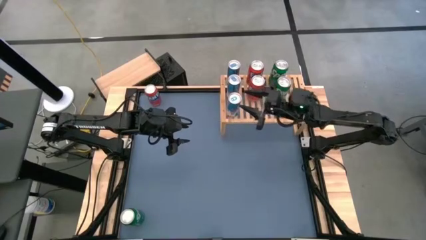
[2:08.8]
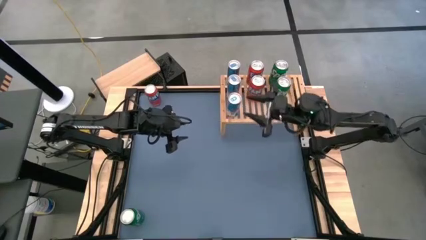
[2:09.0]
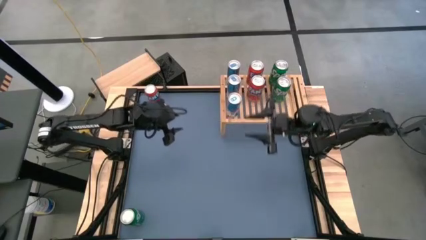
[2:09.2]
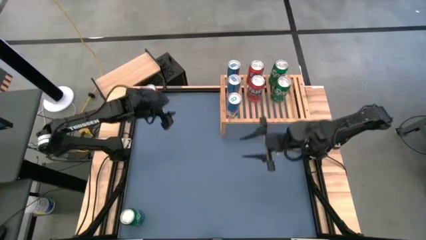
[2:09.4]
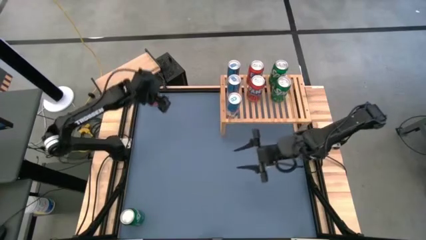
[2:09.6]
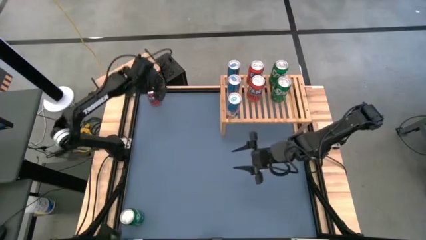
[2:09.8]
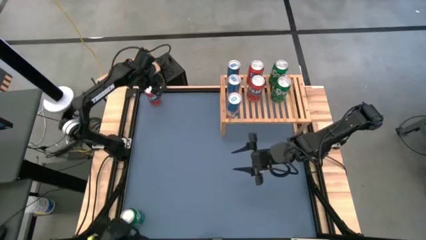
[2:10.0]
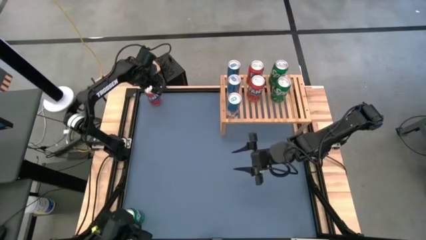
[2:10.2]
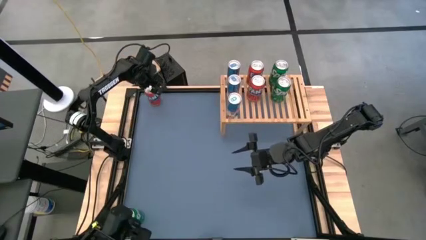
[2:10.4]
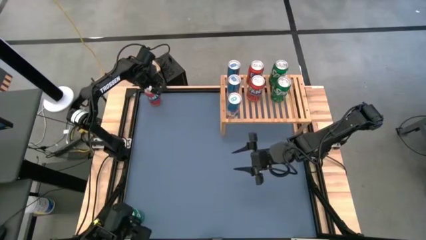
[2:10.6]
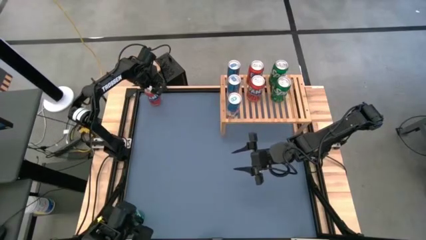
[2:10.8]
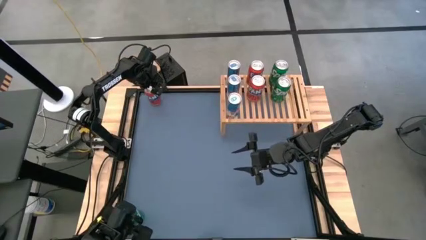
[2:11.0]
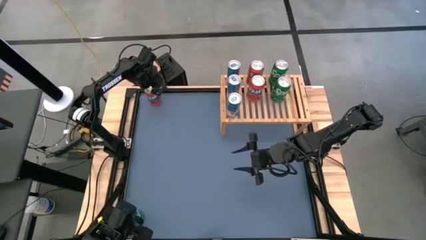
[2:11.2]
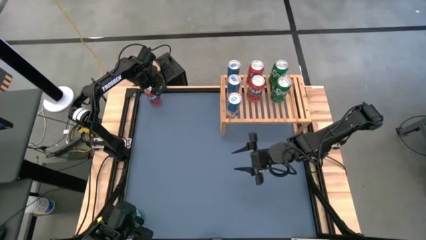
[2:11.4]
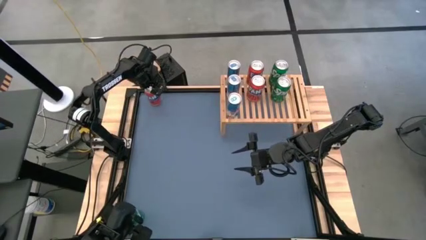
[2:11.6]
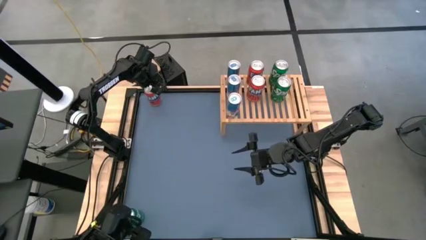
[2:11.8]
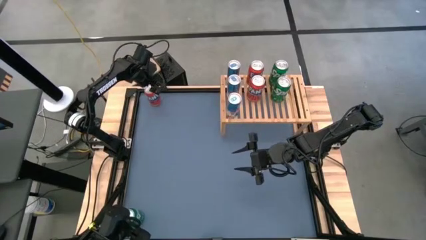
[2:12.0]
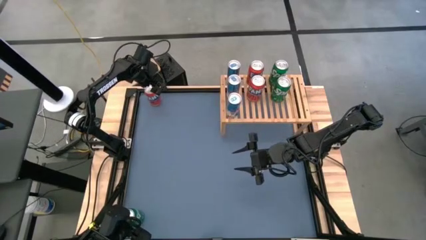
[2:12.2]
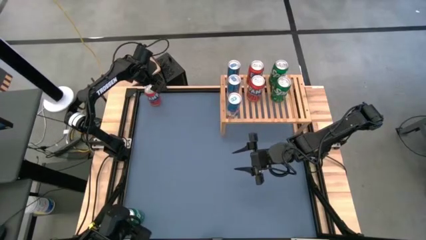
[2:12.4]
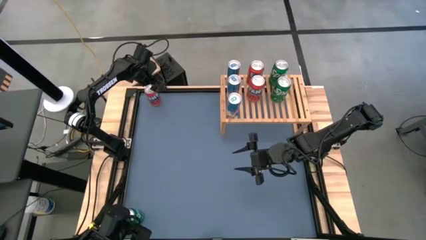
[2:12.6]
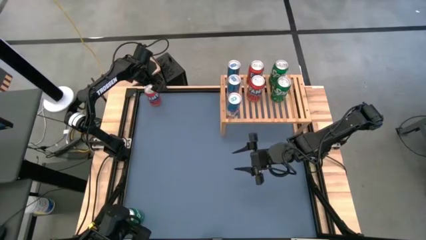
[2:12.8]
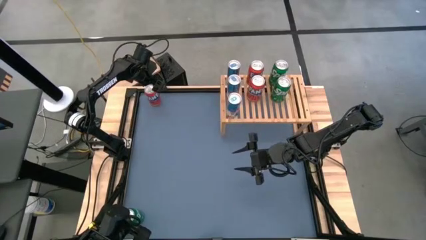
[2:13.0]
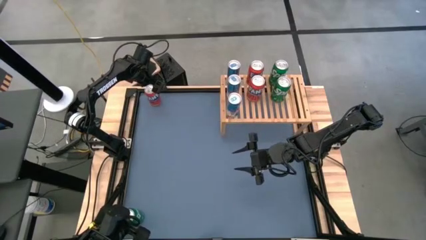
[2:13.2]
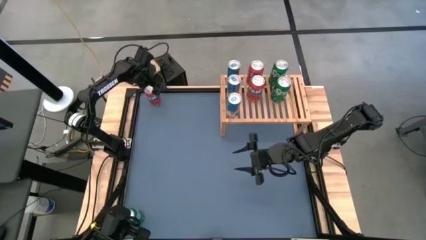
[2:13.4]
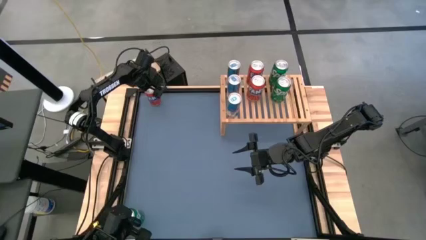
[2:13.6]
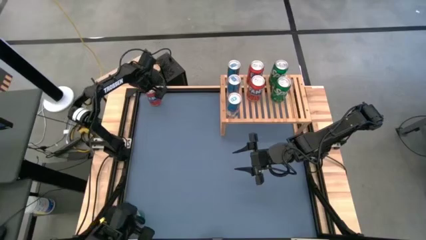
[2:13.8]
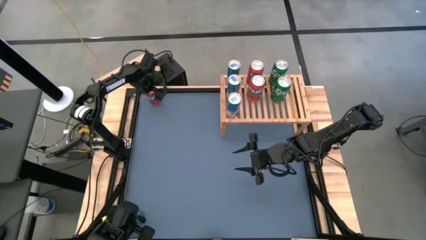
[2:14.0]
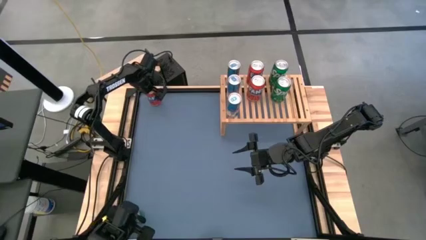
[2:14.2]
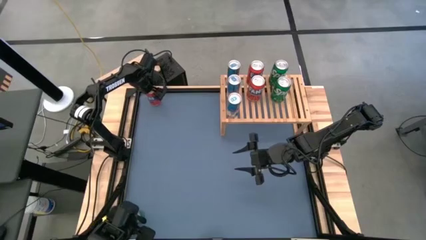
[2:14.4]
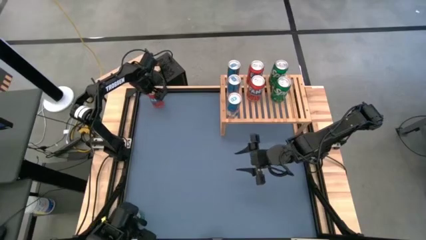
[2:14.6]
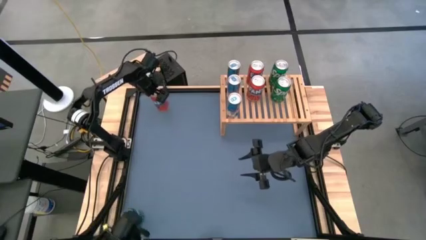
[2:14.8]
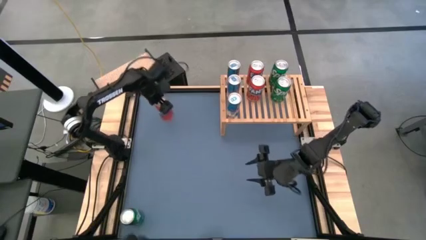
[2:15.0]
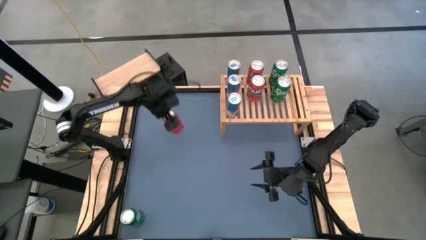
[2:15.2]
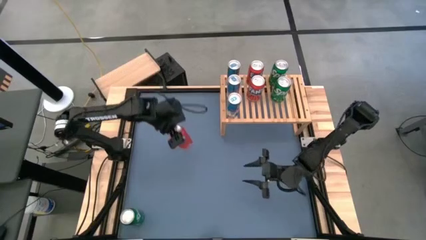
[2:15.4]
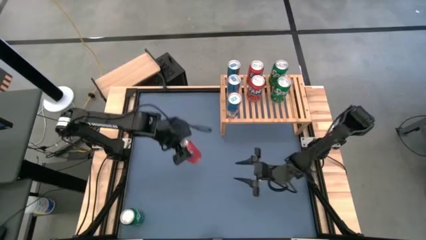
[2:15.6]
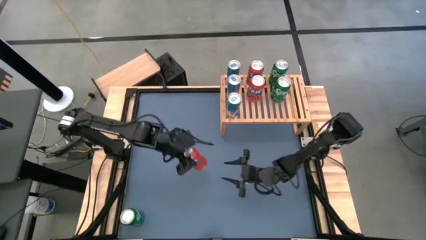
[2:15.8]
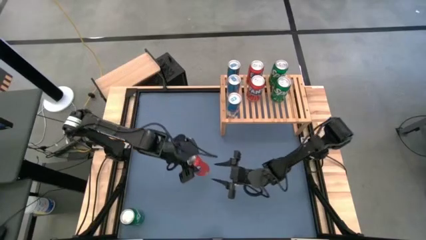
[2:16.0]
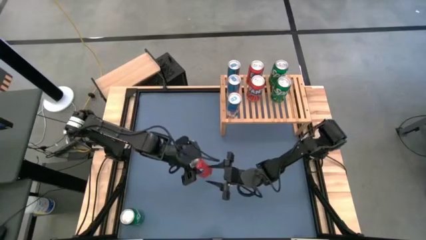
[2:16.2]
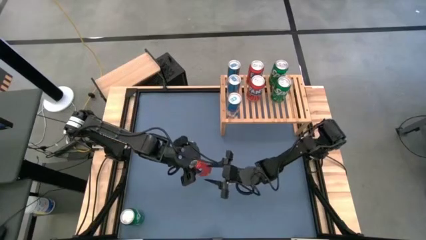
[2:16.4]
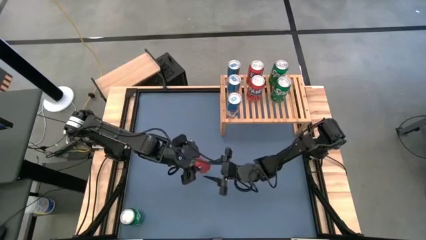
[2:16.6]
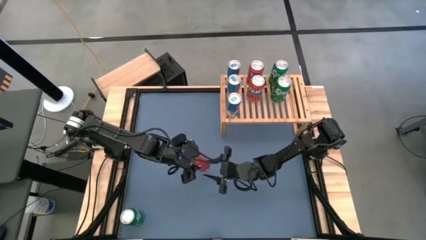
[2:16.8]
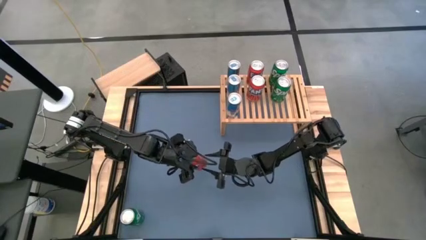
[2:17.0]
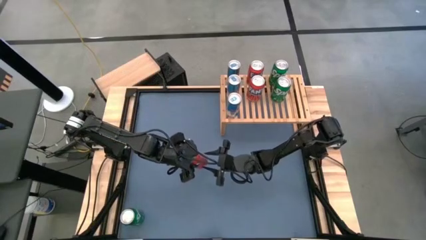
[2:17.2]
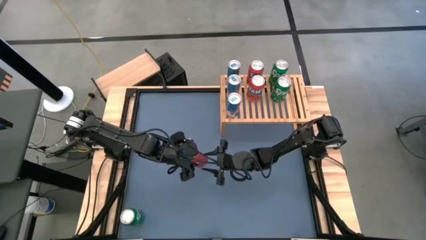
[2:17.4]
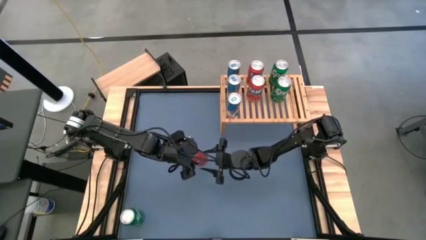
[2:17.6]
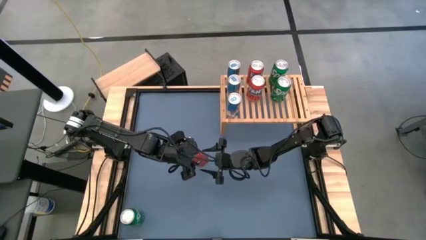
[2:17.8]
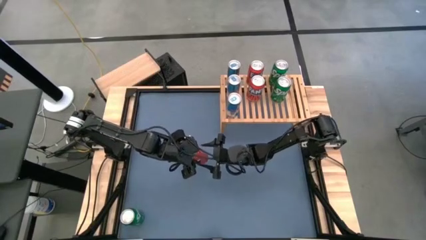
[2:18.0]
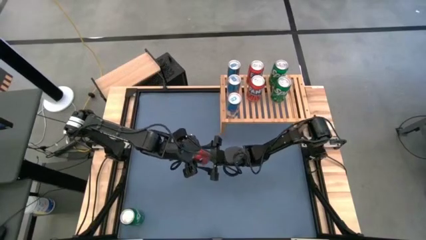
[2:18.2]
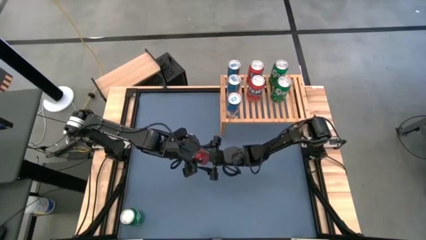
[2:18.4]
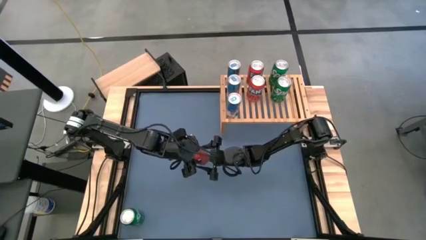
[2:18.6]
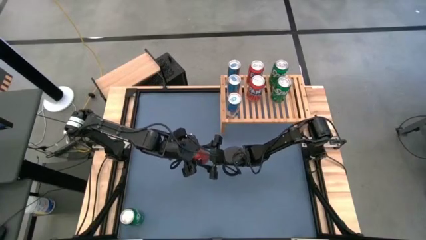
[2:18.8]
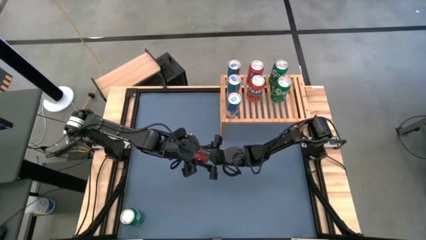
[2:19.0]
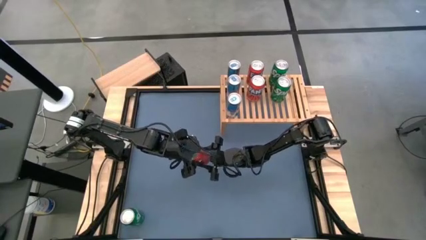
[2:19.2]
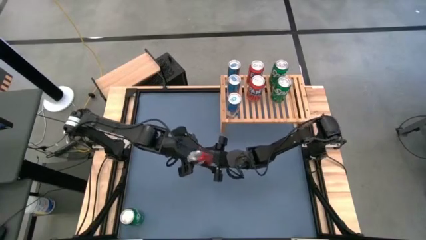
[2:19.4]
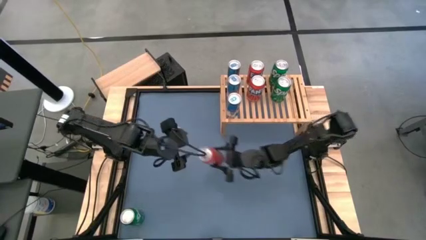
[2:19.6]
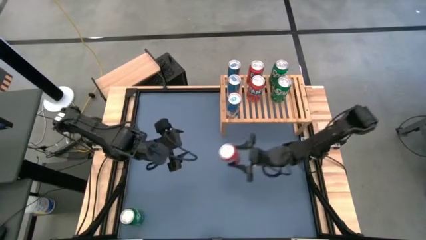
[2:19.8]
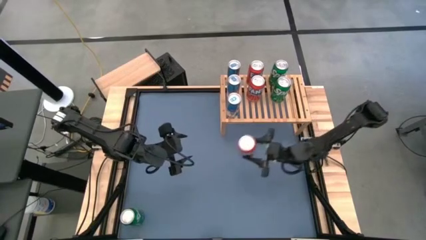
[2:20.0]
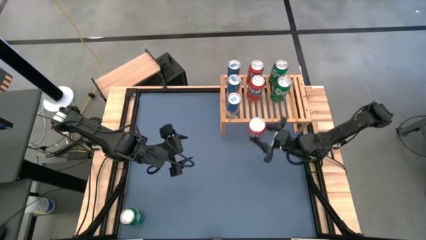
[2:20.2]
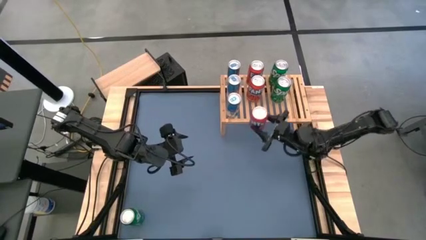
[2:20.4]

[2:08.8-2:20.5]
Task: Place canned beverage on shelf
Put the red soda can on the shelf aligned with the other red soda can
